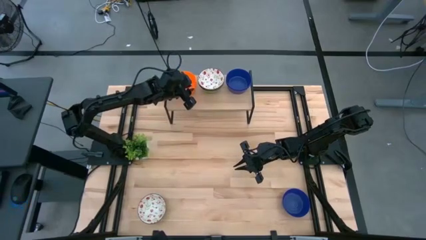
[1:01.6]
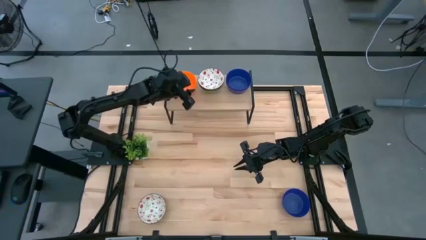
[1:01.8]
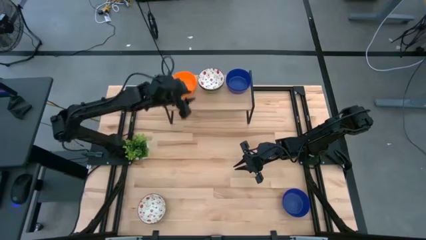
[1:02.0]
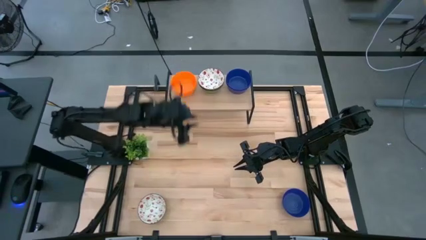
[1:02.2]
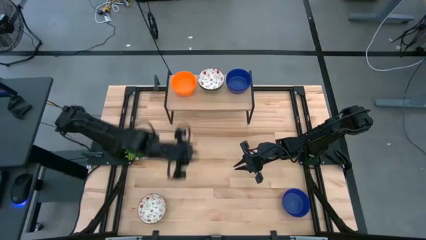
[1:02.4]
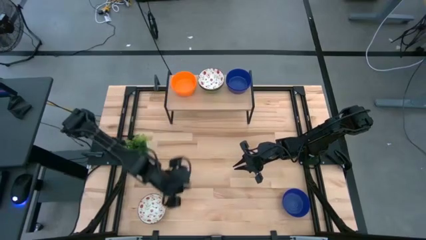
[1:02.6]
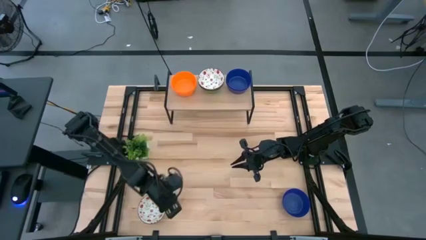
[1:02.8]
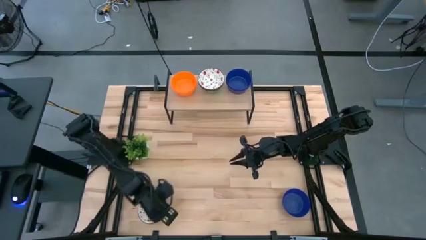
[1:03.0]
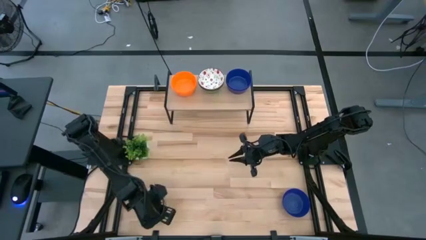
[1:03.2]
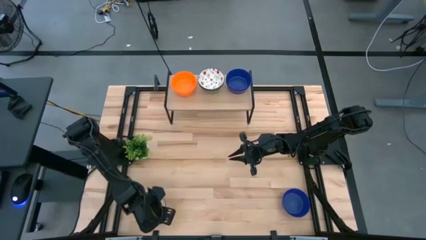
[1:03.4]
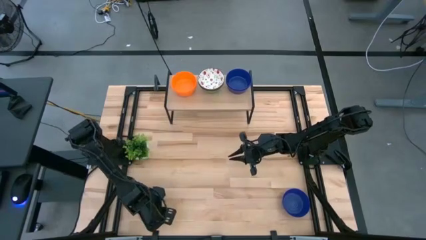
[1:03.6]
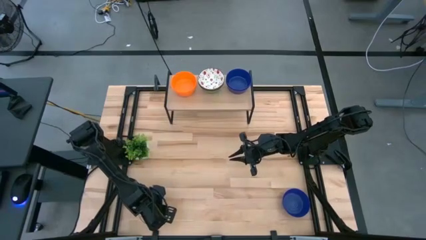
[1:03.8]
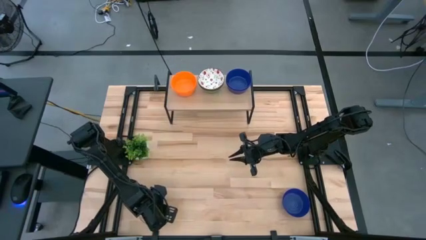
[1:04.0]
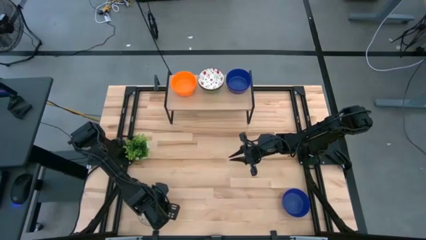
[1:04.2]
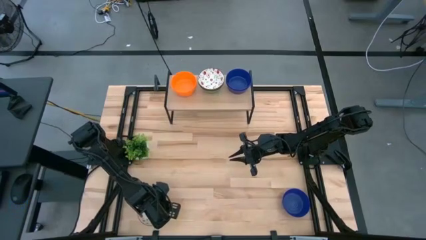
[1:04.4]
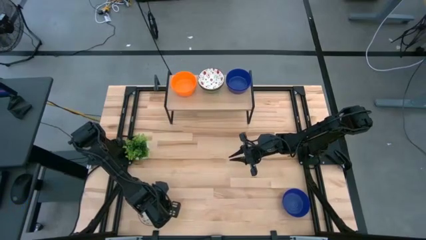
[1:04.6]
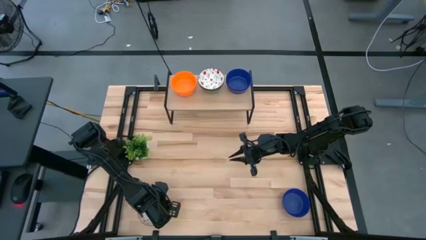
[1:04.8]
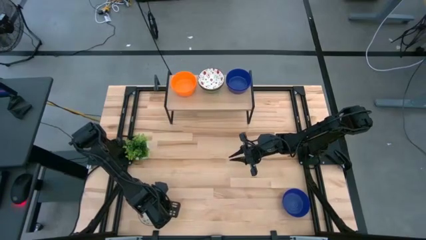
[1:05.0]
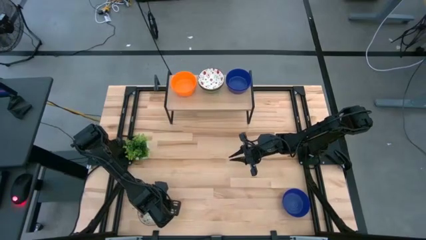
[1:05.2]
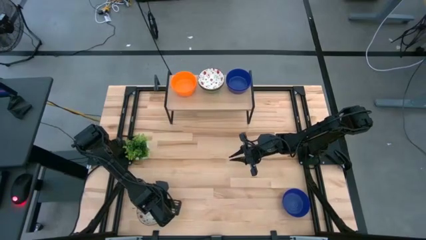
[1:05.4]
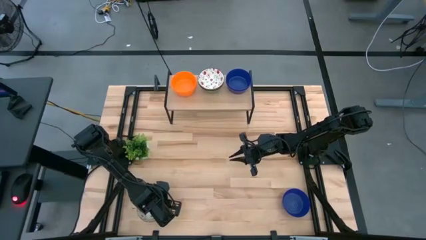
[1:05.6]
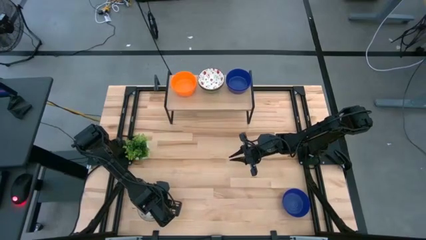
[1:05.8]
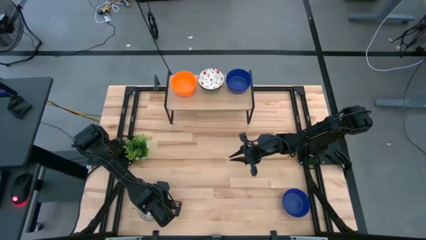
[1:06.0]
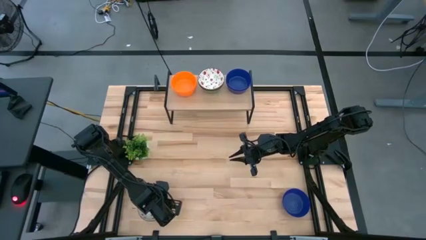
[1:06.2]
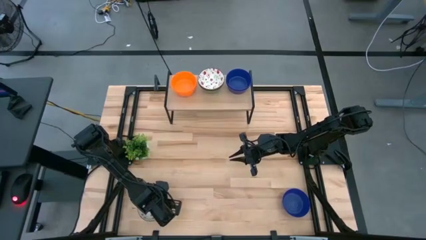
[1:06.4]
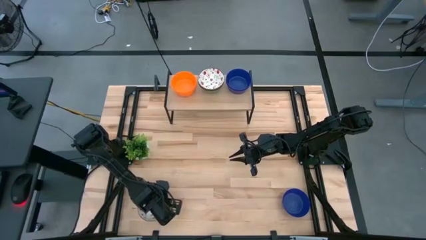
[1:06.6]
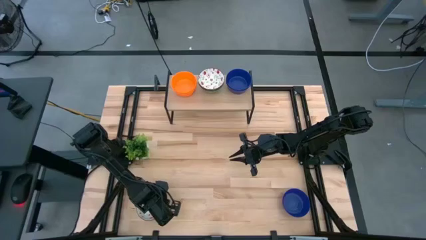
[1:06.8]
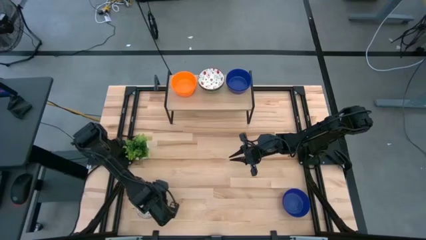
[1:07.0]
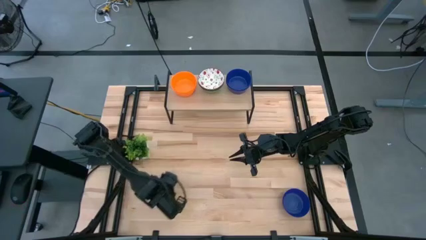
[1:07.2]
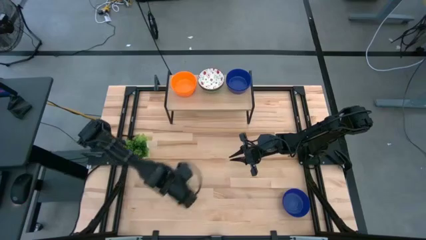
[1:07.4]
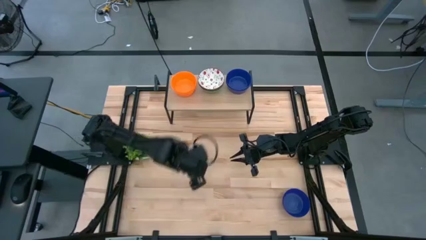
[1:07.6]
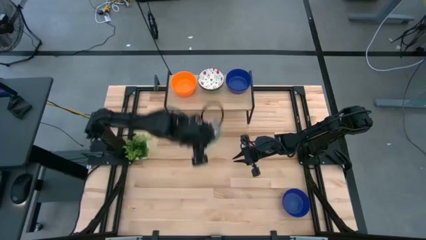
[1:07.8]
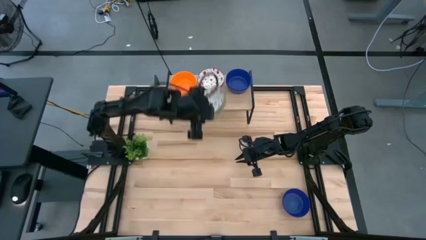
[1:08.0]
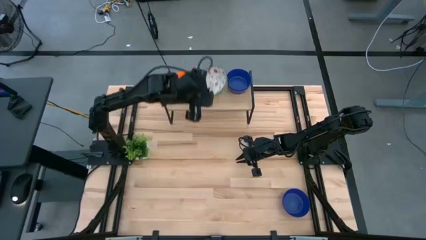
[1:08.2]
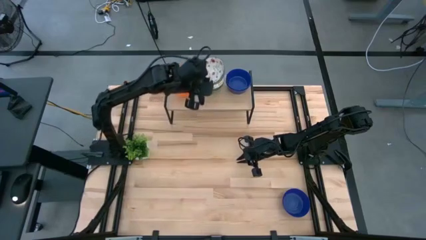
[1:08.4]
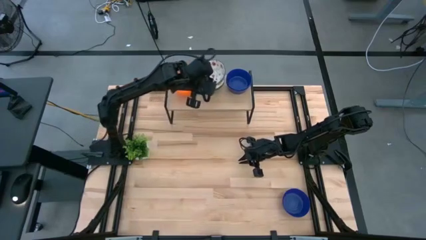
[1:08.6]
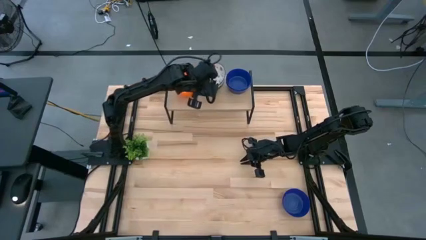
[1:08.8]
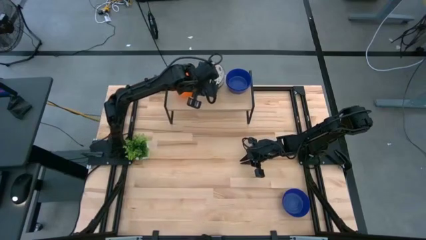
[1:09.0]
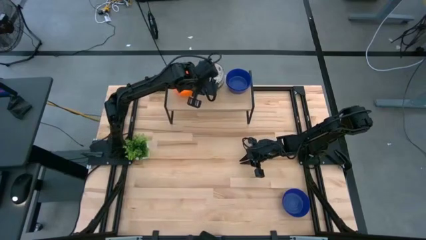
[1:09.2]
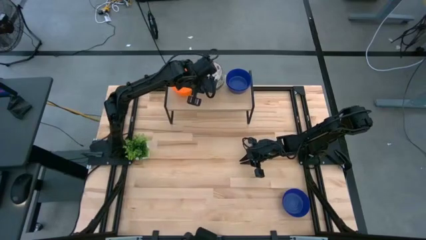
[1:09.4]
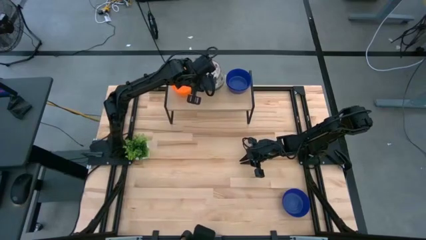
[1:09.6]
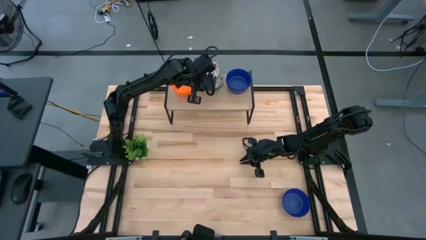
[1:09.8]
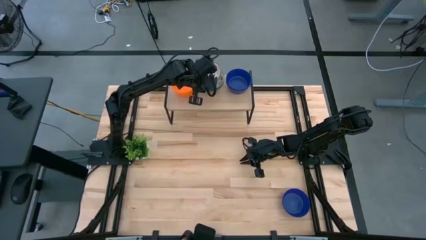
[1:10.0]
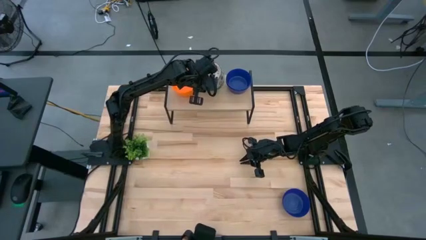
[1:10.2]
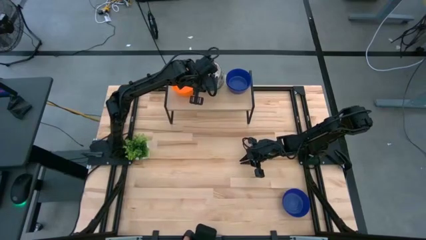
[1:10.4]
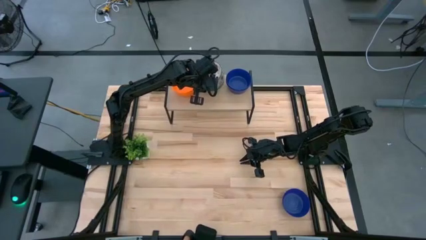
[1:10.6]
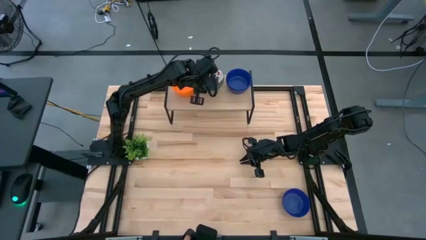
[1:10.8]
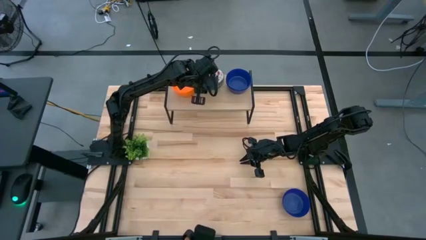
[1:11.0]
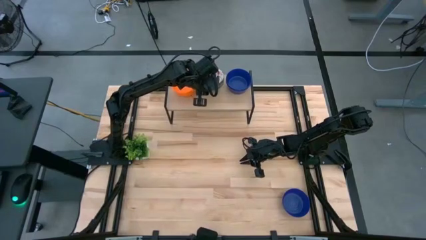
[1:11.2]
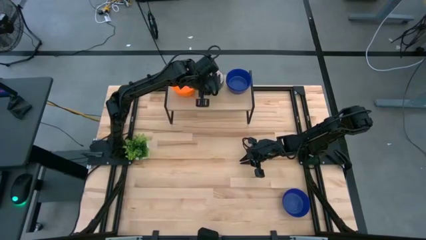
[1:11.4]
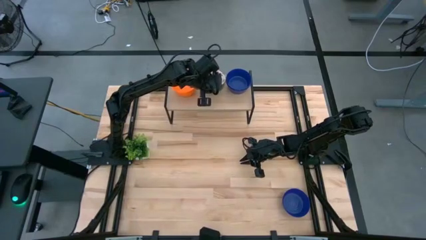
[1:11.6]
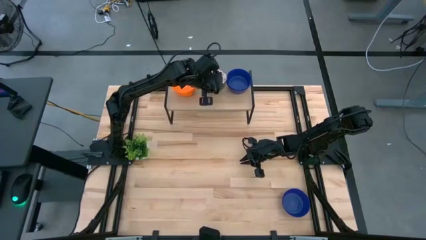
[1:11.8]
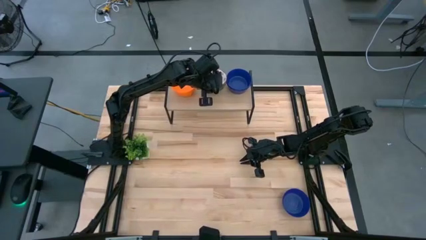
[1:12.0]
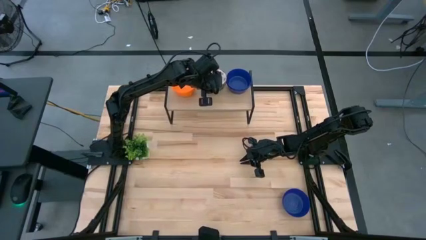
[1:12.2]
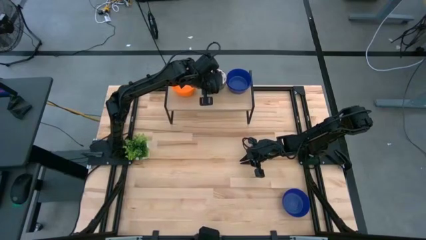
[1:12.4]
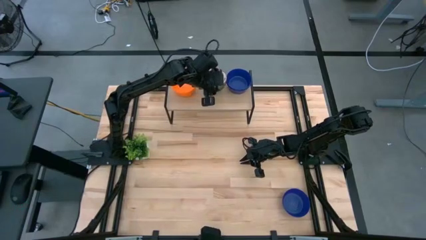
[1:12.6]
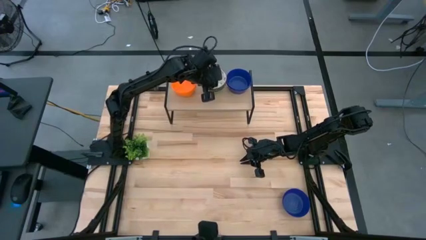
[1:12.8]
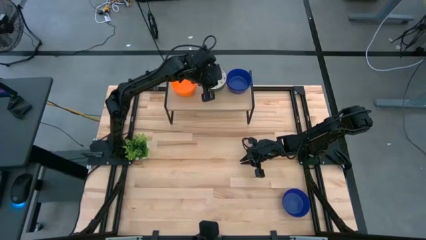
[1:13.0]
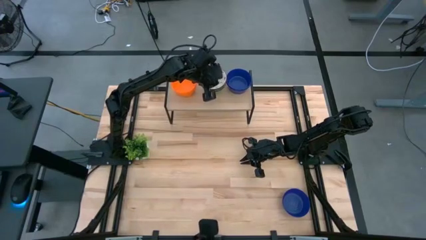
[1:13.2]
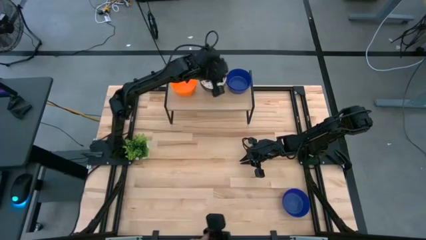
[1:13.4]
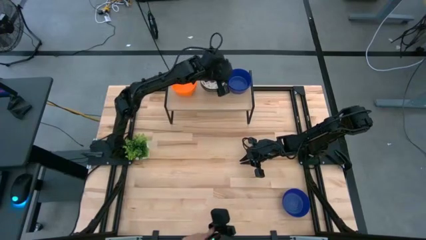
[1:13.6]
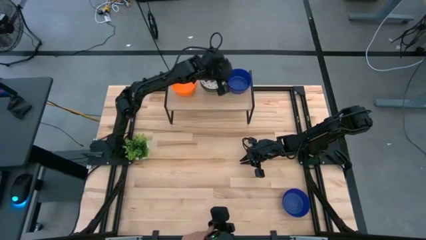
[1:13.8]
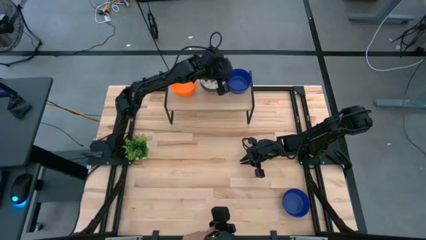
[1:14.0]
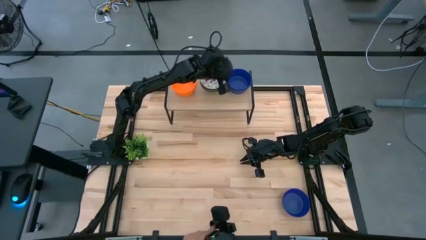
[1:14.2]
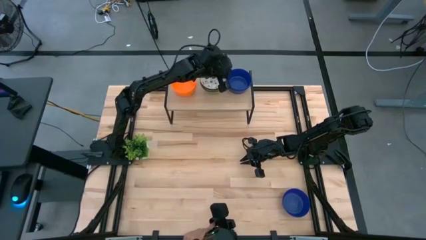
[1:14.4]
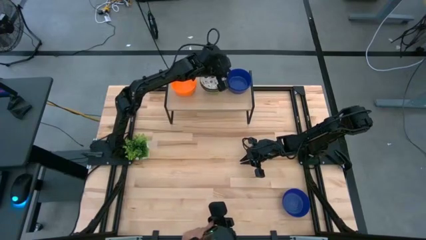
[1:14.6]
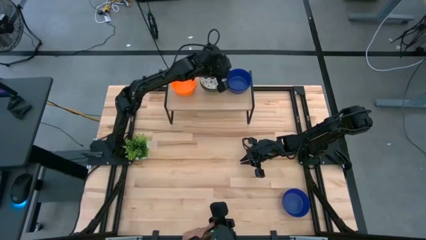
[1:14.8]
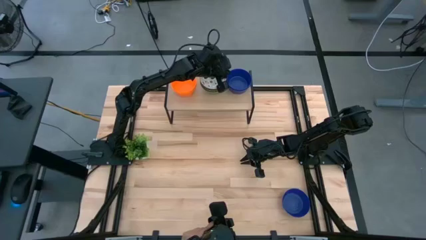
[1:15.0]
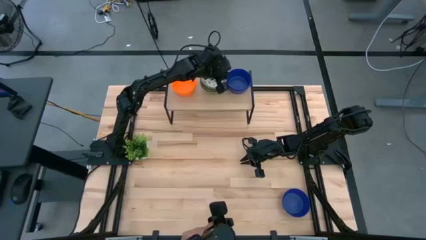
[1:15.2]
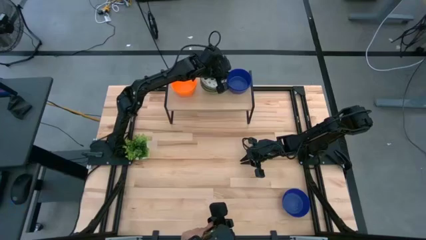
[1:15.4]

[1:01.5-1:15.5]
Task: Pick & Place Mini bowls
Stack the green patterned bowl on top of the other green patterned bowl on the shelf

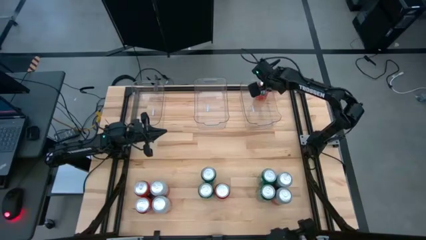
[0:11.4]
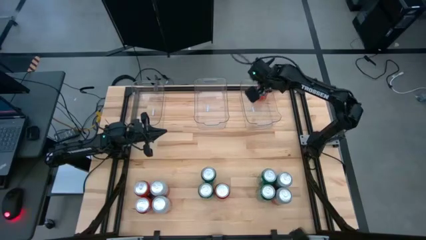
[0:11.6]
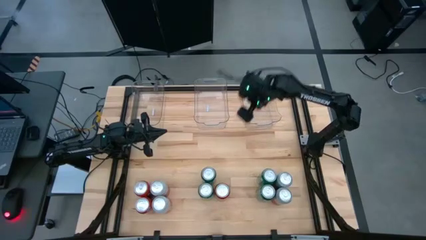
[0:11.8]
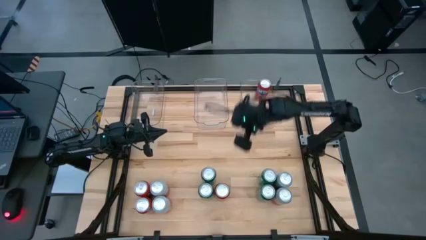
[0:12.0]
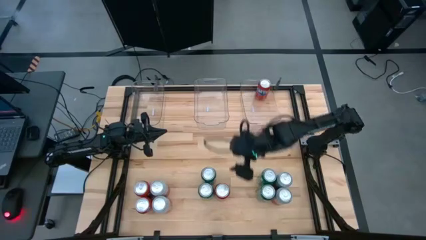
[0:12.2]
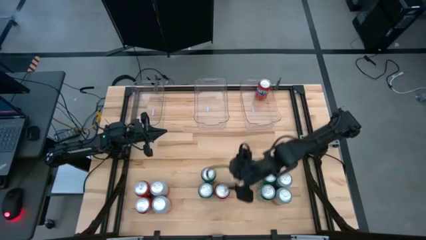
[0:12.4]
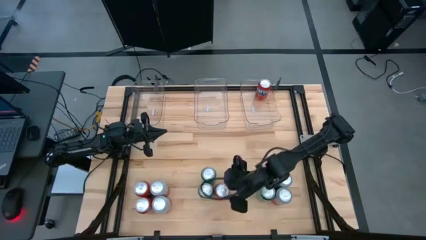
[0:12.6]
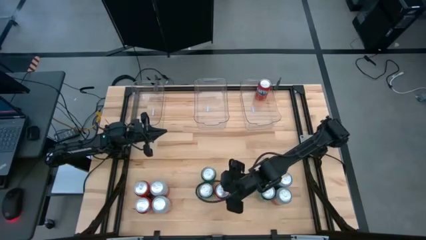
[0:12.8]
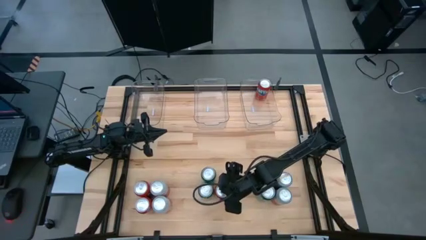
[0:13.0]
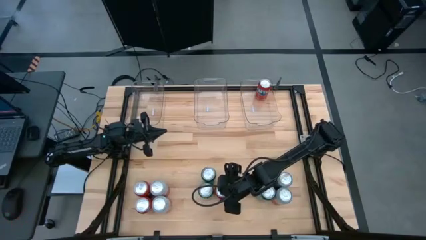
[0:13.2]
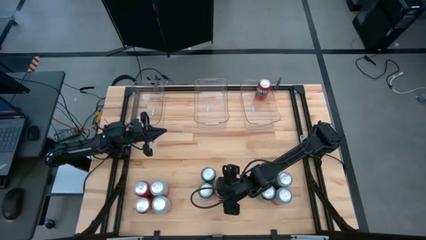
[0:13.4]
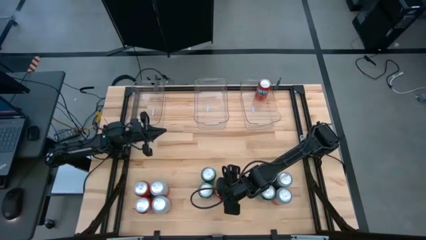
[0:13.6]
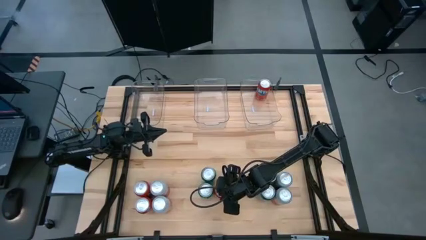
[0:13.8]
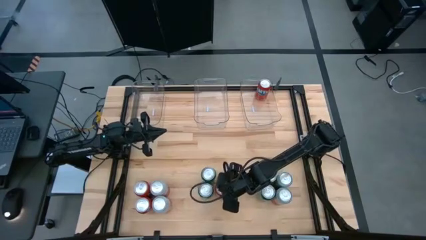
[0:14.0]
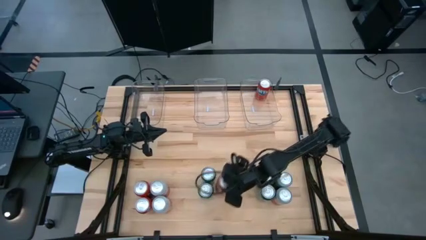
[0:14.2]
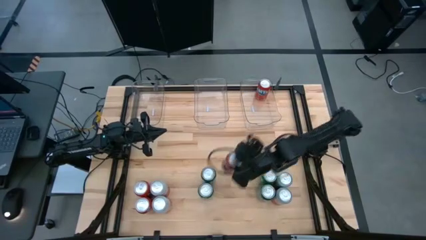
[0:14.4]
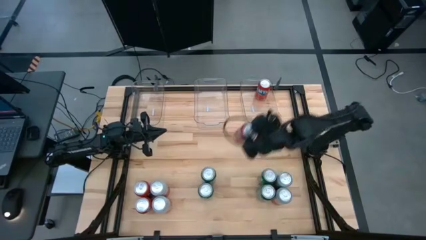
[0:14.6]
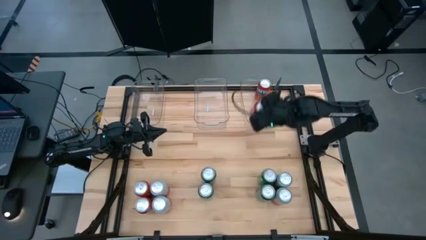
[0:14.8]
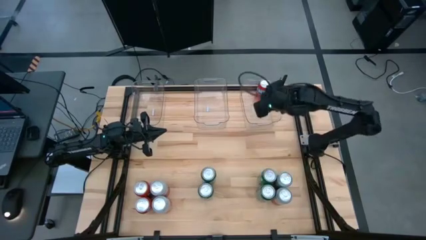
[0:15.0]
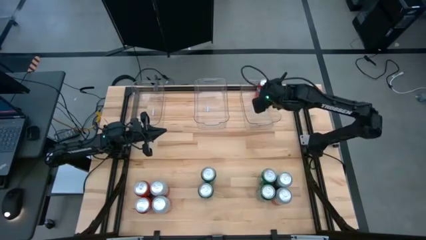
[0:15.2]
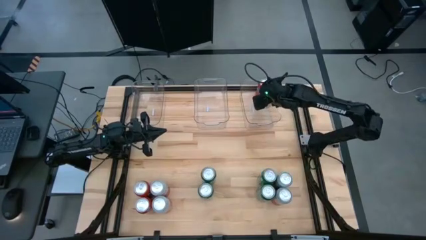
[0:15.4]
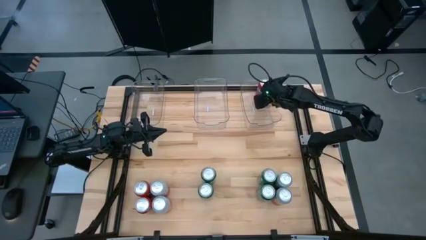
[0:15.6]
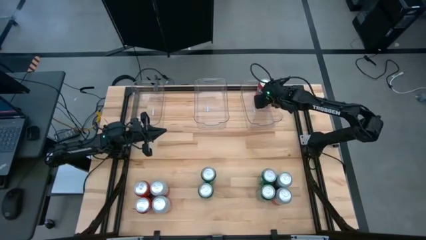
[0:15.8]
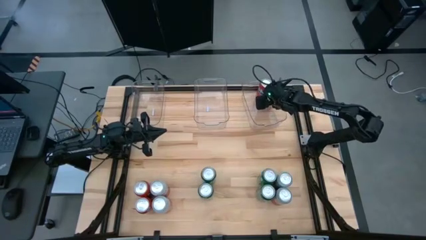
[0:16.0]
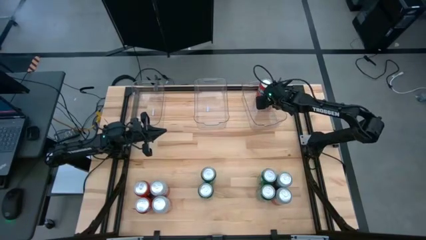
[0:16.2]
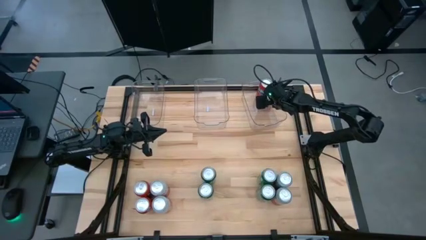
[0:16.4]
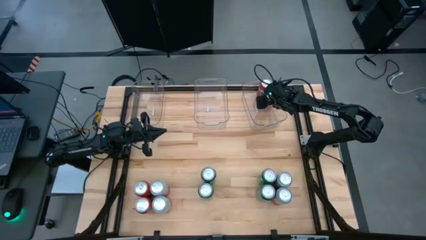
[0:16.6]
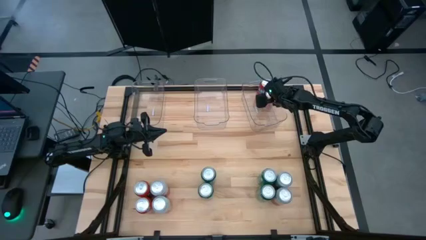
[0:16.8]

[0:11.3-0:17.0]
Task: Sort soda cans
Put the bottom right orange soda can into the right transparent bin
